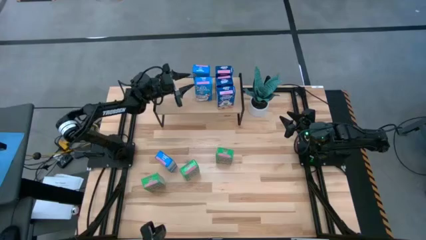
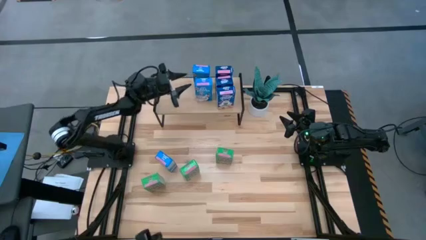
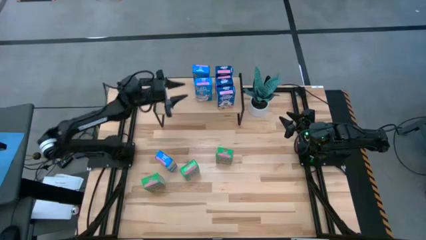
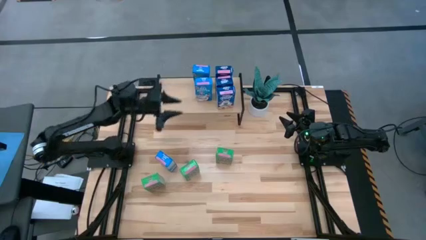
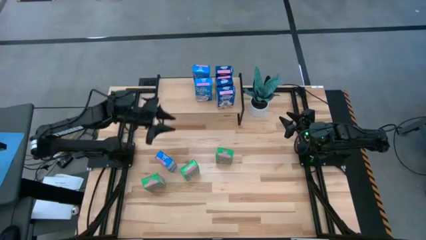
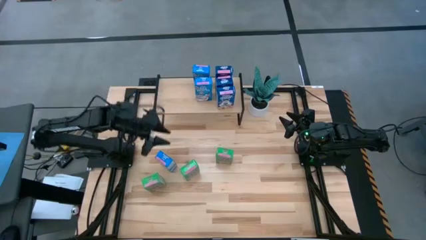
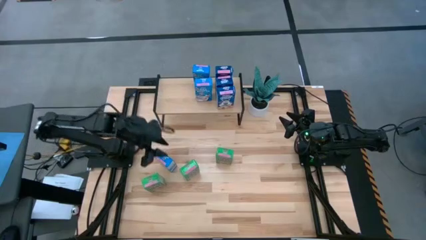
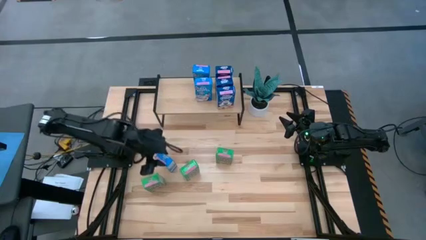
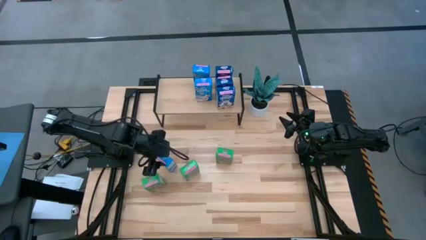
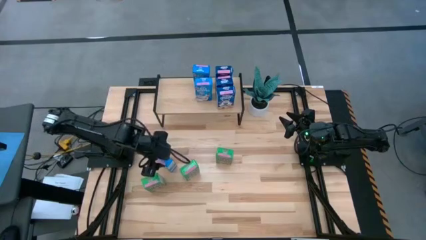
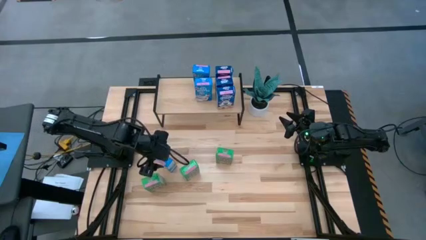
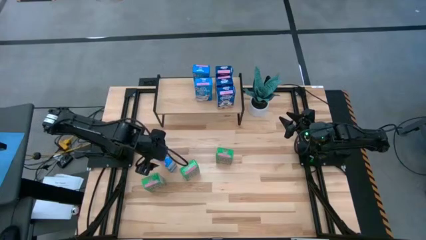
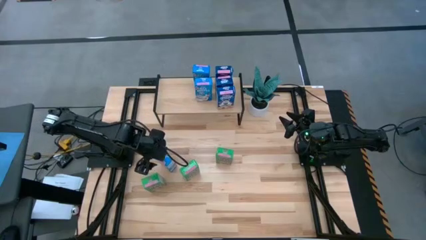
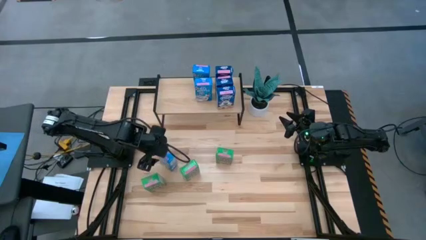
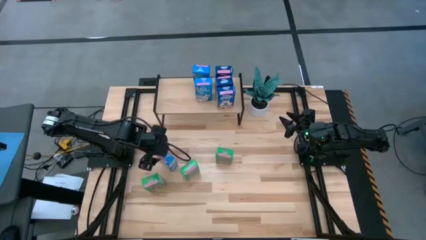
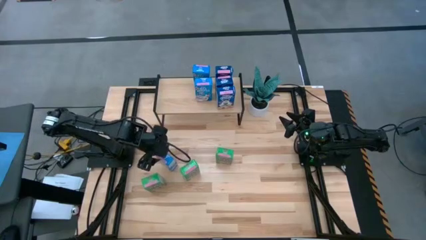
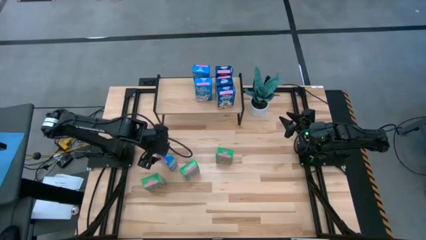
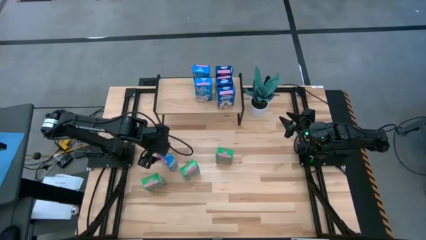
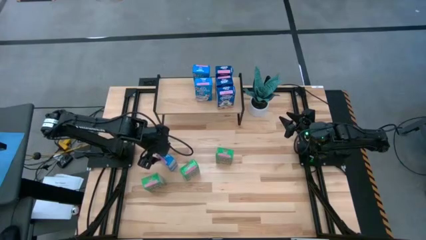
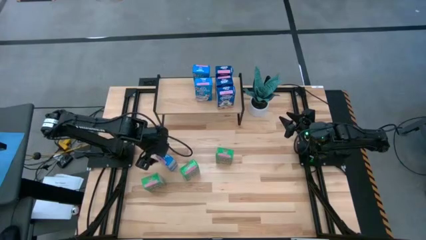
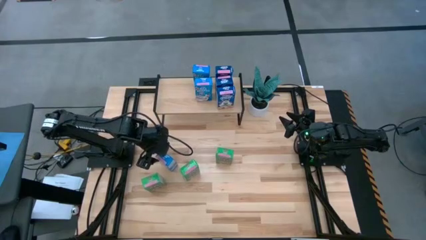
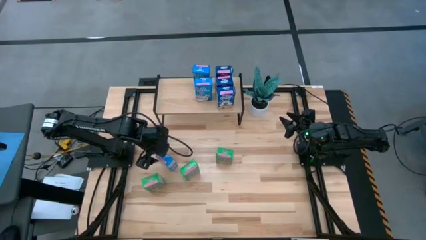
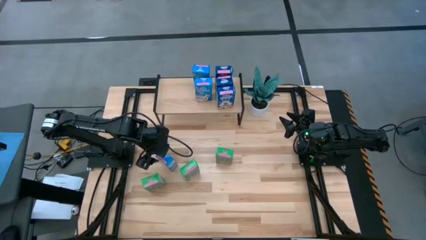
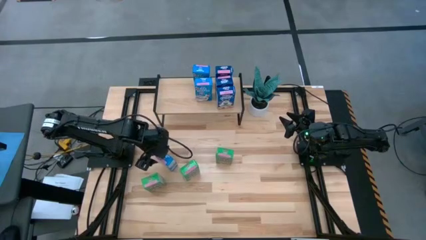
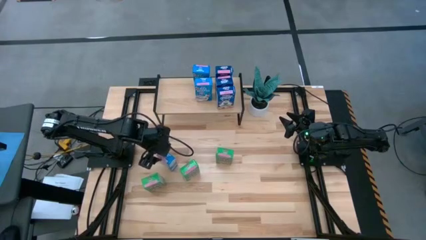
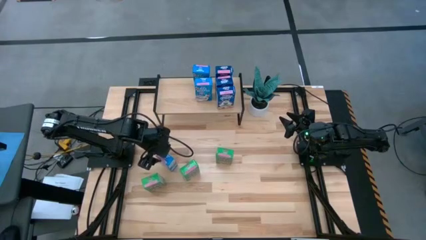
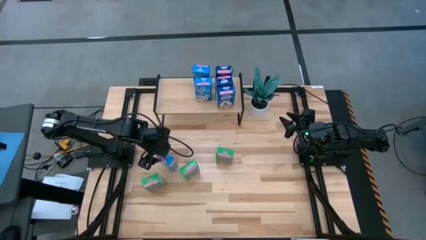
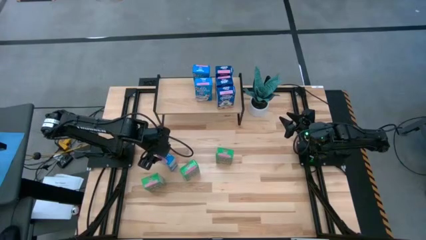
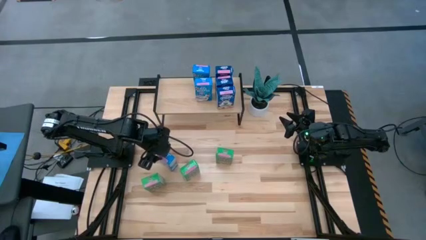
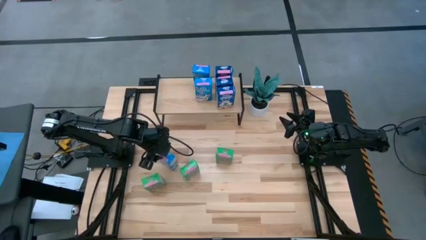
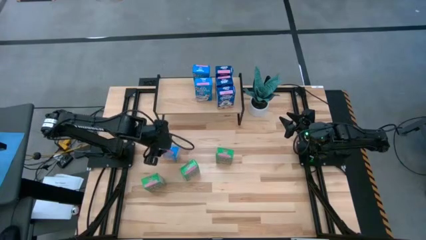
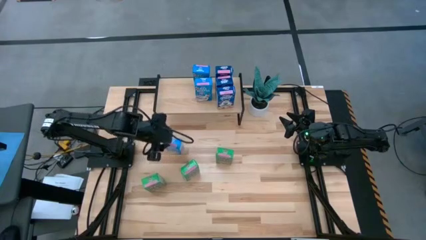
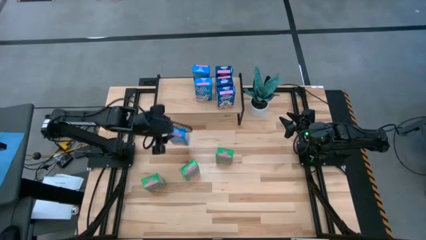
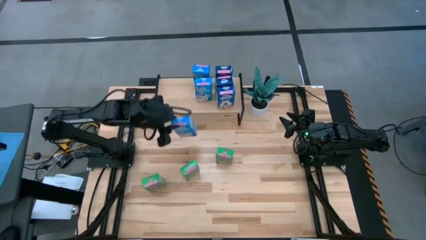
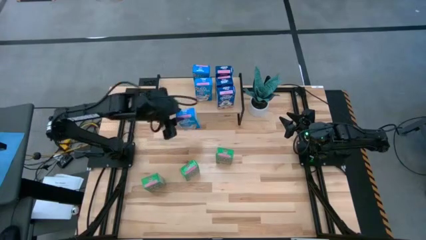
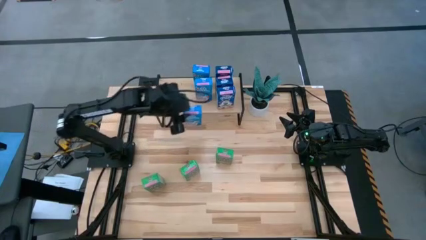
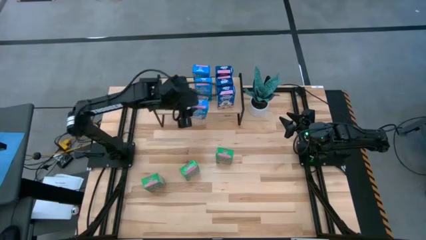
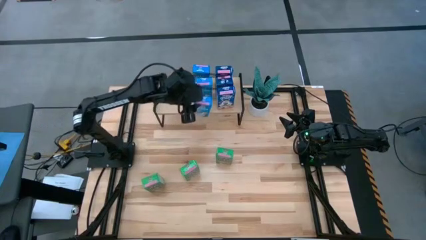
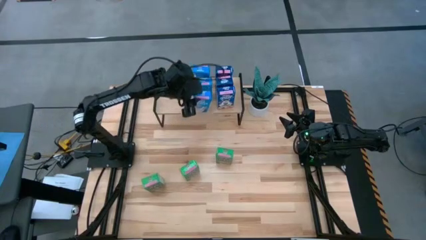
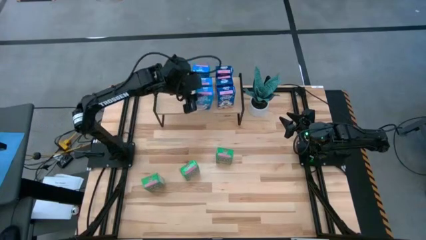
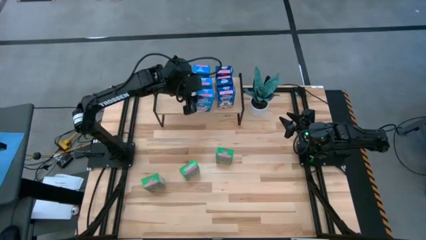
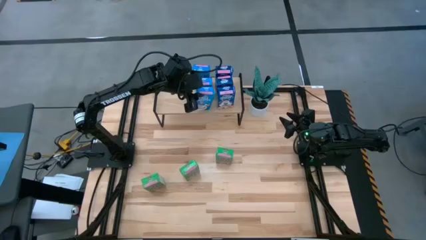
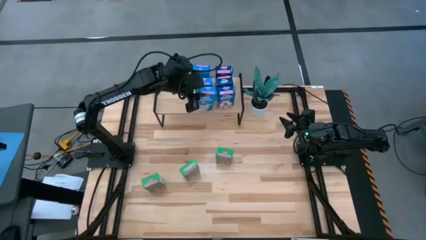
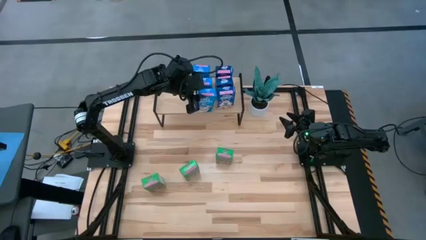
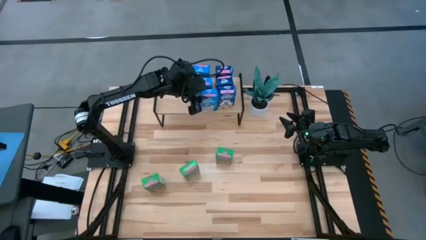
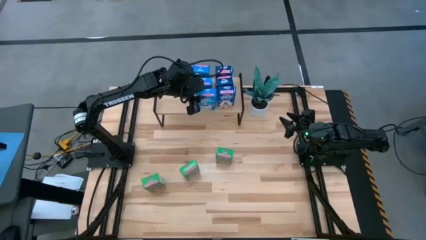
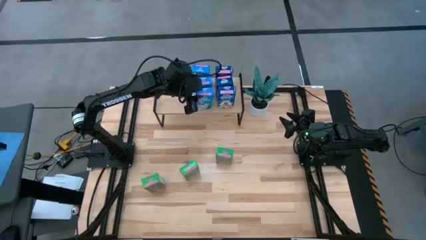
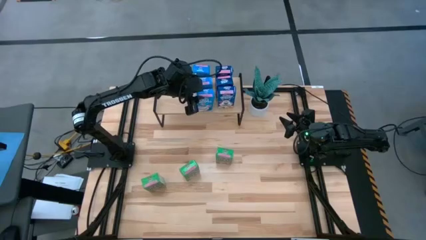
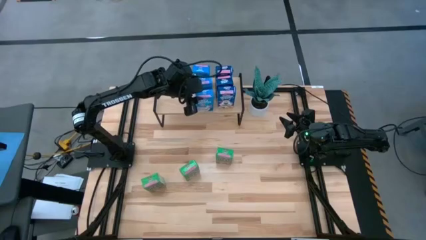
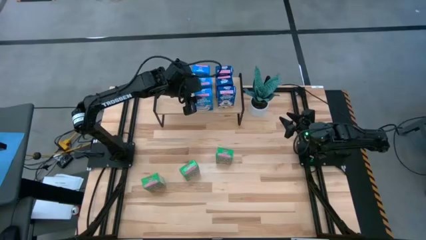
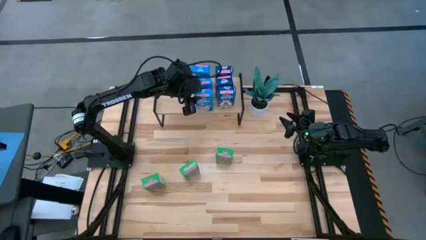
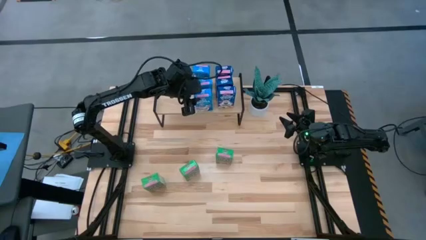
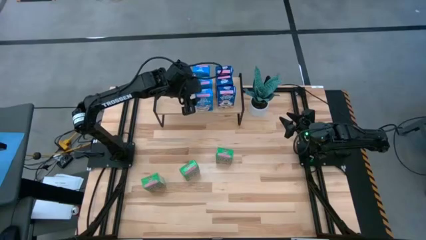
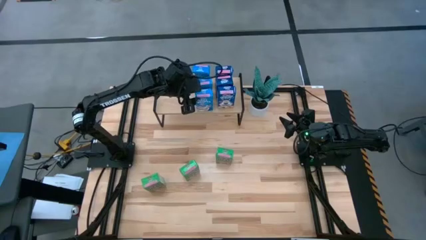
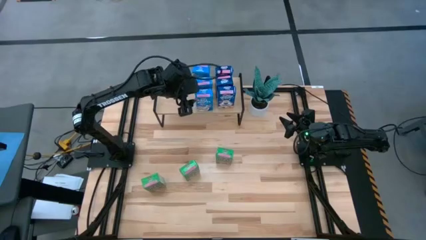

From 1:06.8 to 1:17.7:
Task: Stack cereal on shelf
Put the light blue cereal box on the shelf aligned with the other light blue cereal boxes

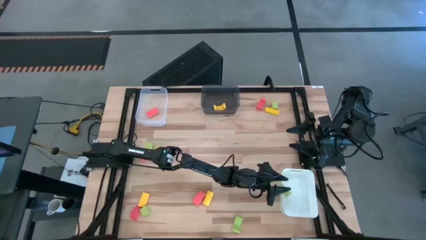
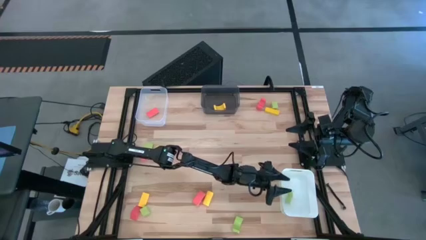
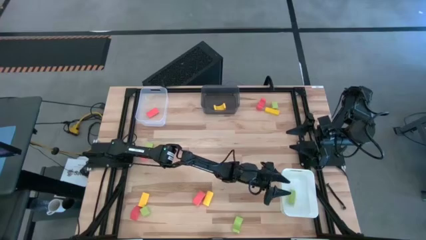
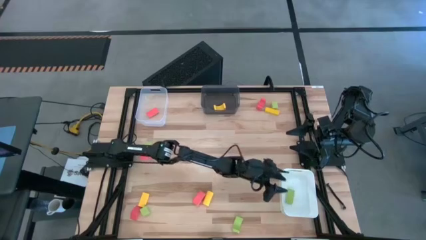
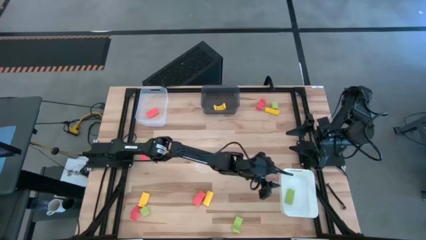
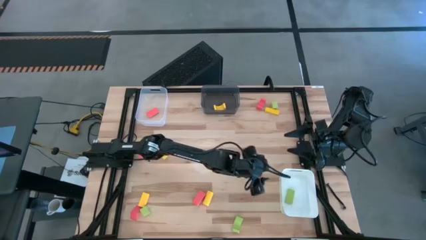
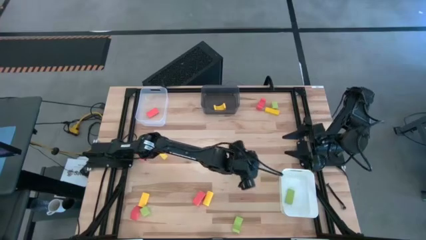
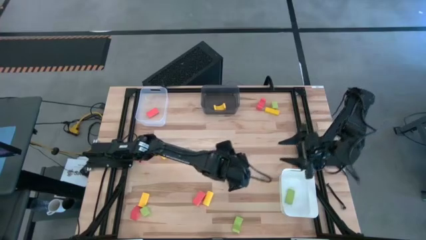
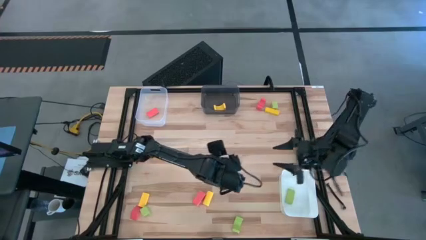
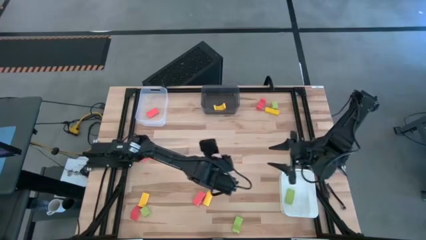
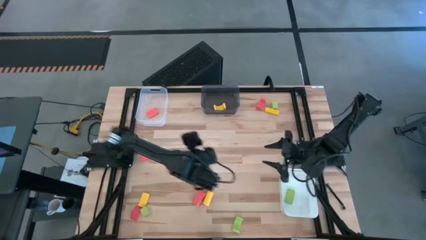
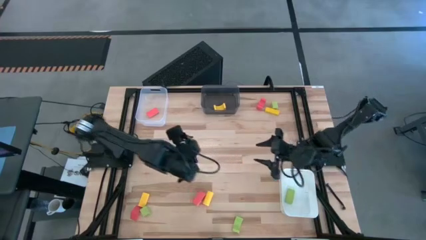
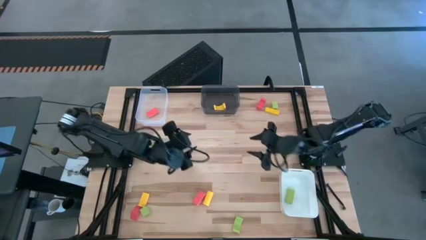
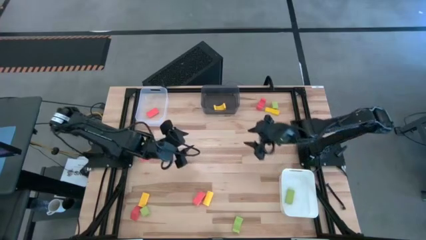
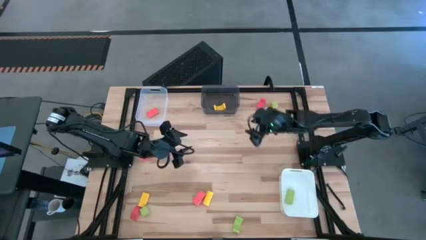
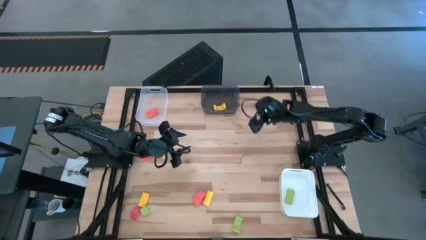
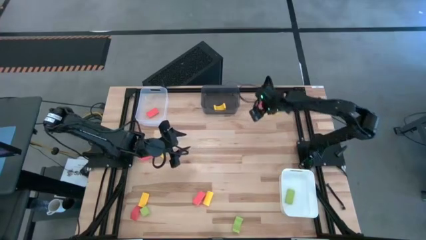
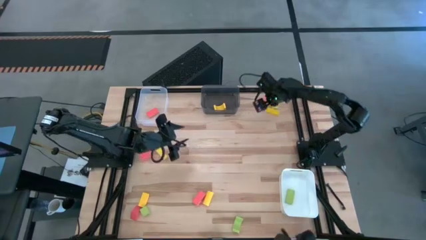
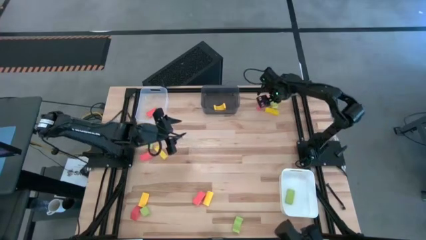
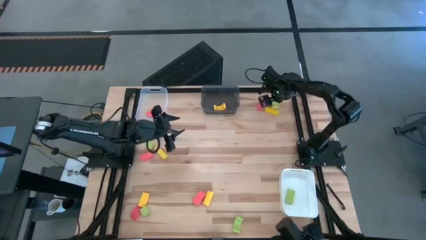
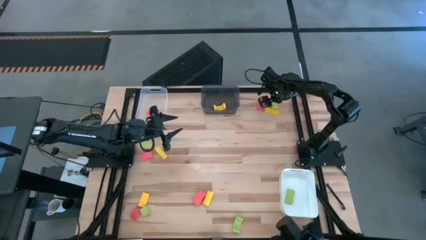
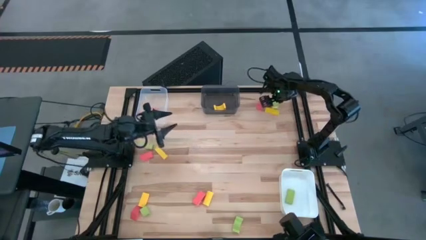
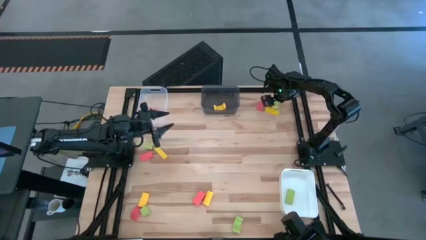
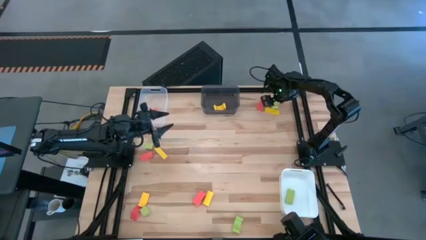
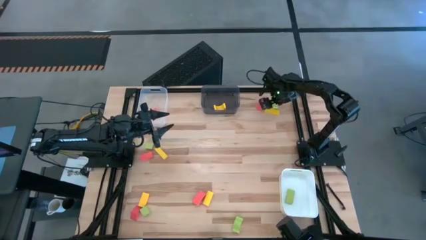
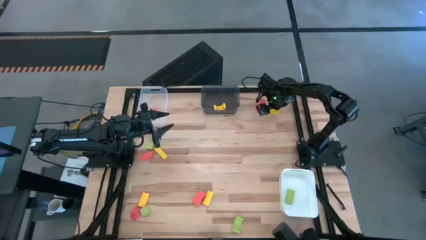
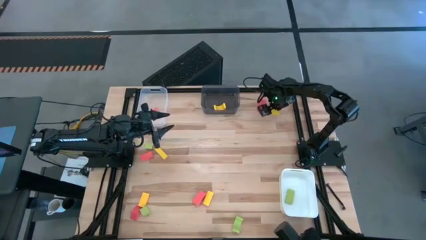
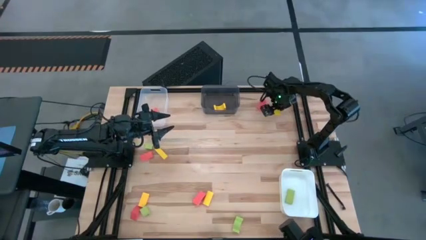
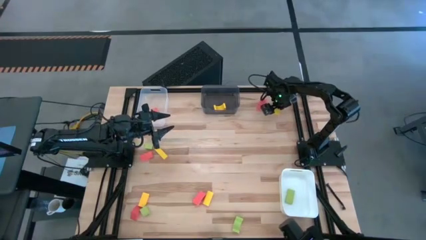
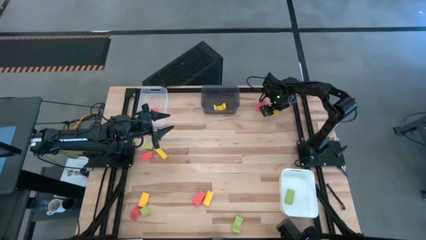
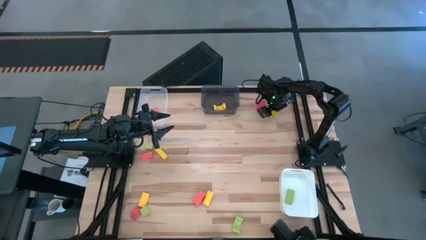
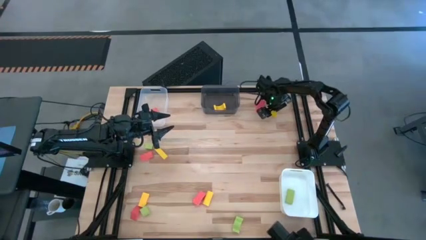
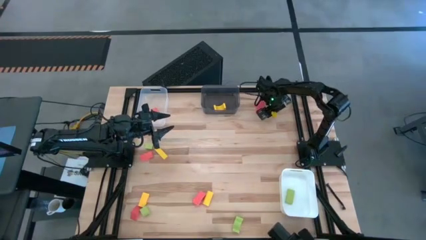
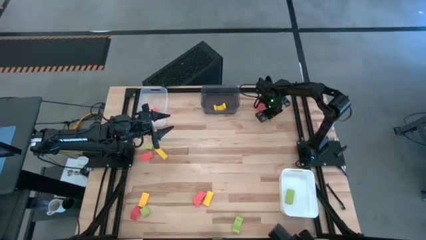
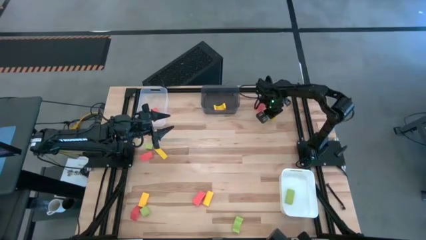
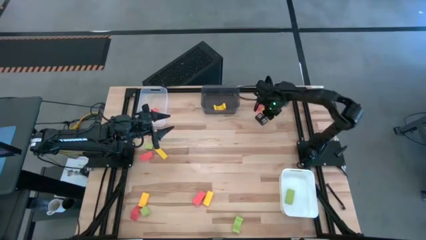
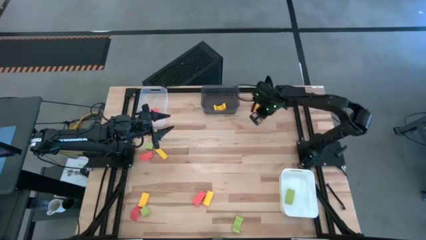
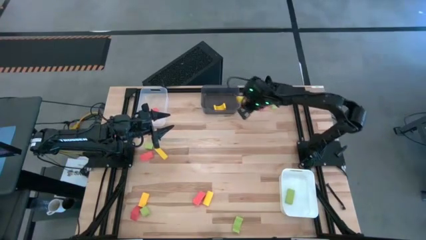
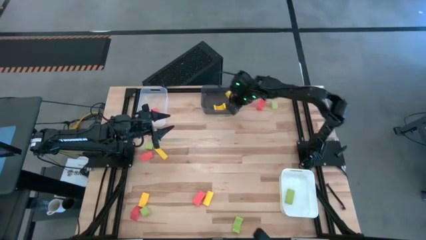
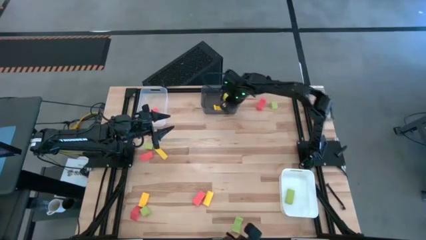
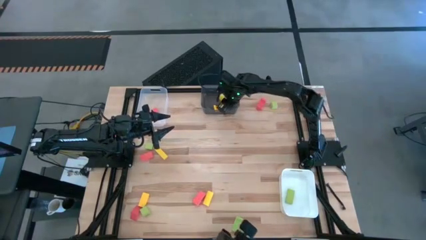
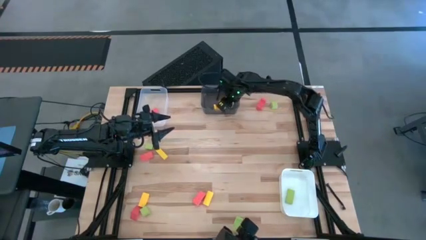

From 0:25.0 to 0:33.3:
Task: Sort & place blocks by color
Put the top right yellow block into the black bin
